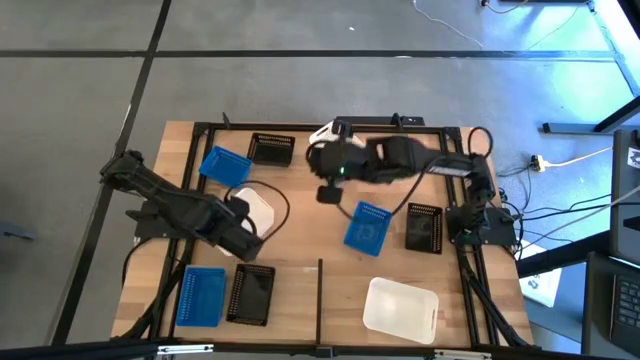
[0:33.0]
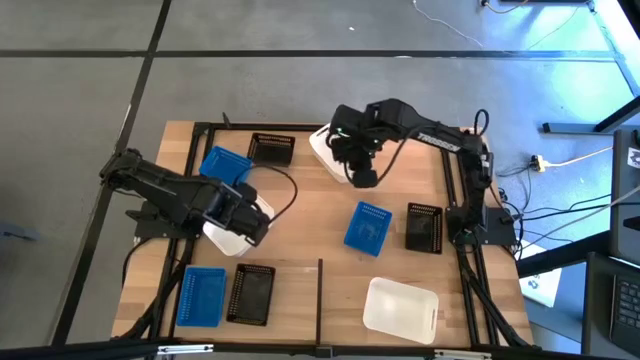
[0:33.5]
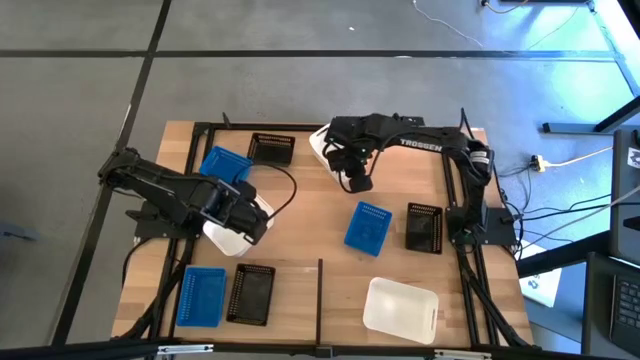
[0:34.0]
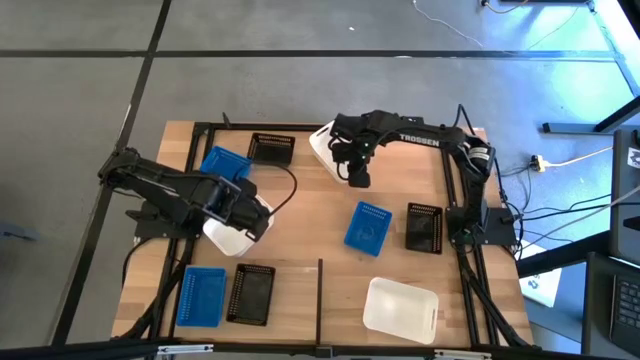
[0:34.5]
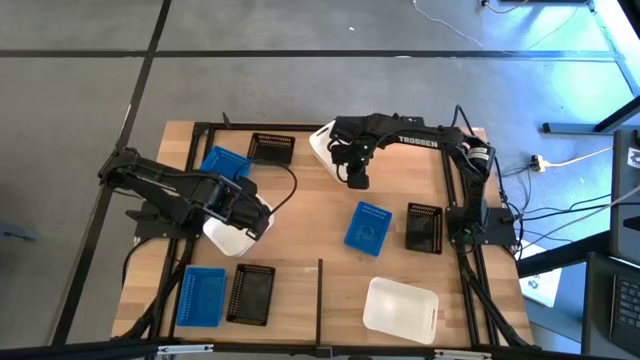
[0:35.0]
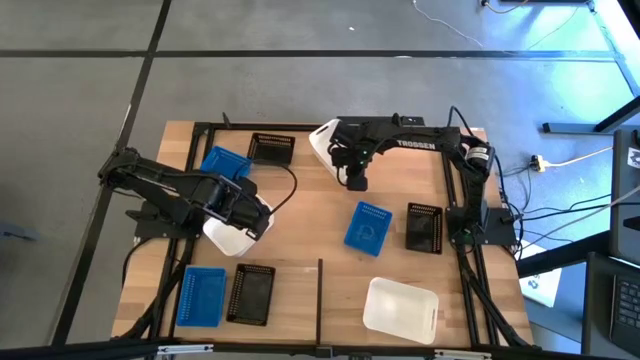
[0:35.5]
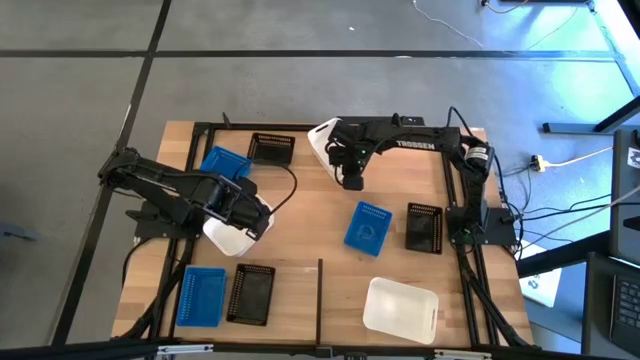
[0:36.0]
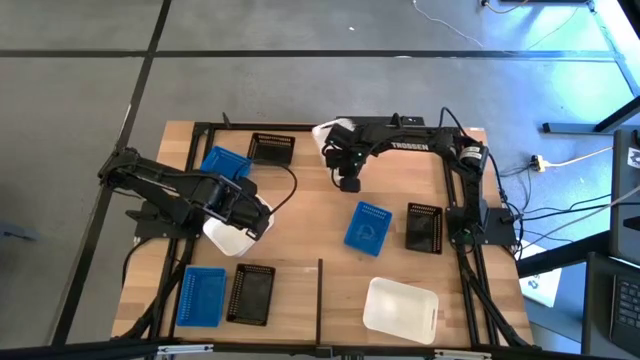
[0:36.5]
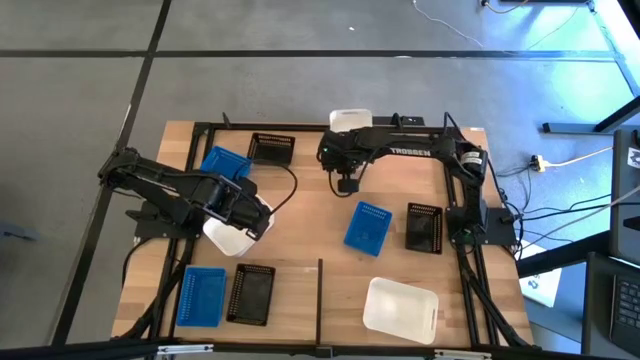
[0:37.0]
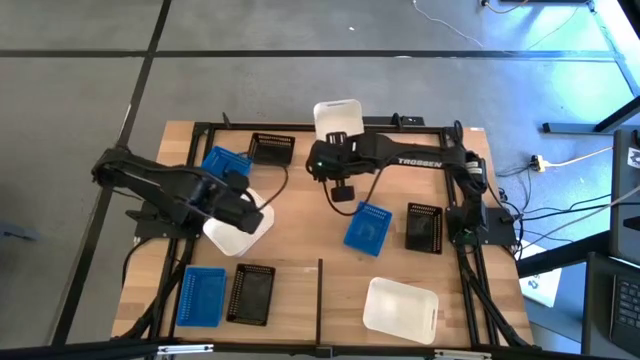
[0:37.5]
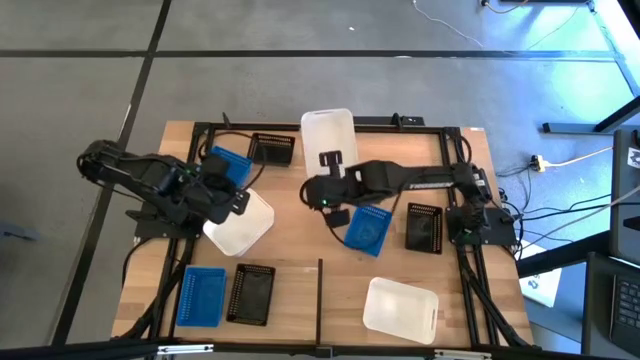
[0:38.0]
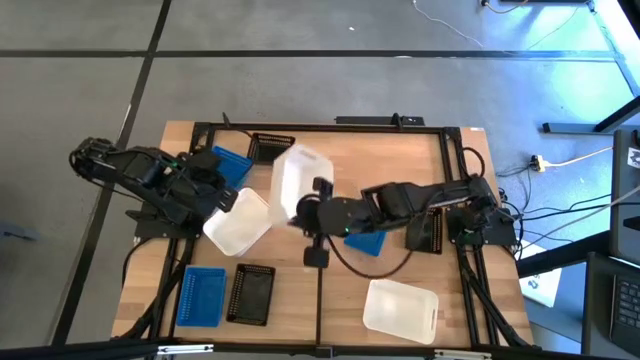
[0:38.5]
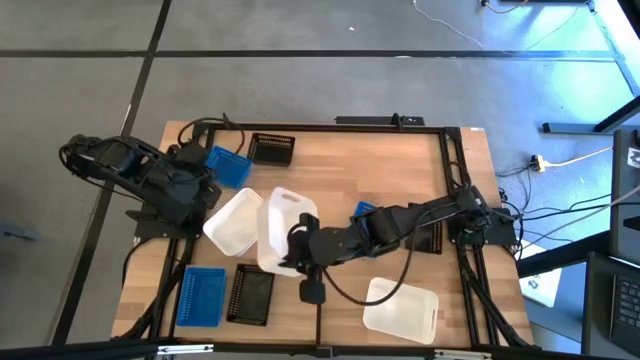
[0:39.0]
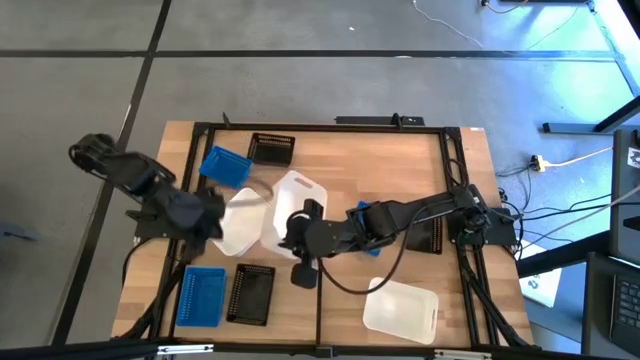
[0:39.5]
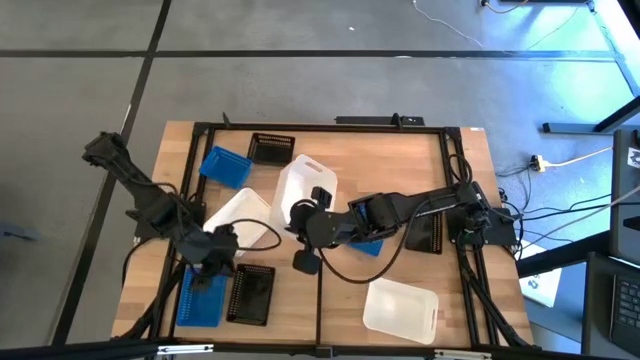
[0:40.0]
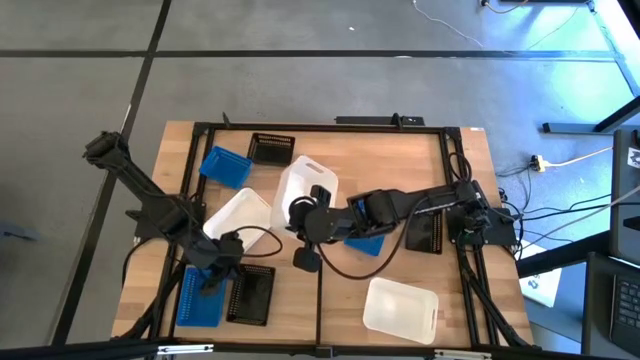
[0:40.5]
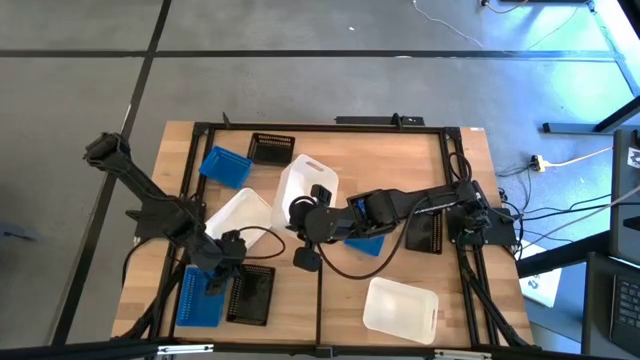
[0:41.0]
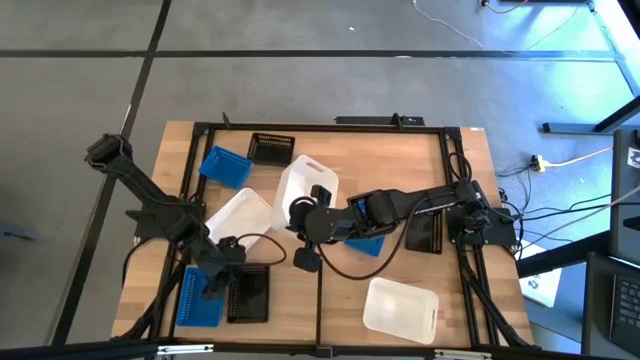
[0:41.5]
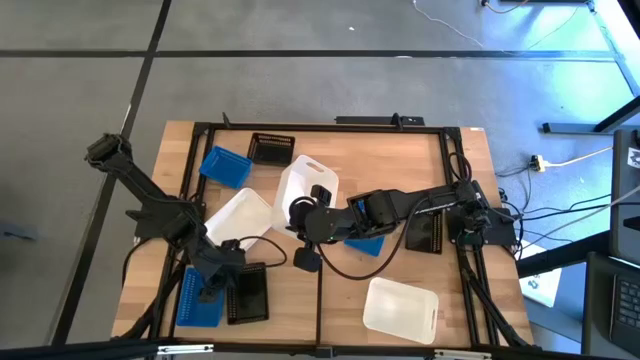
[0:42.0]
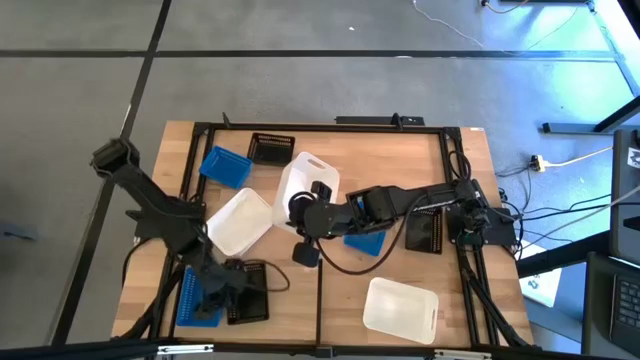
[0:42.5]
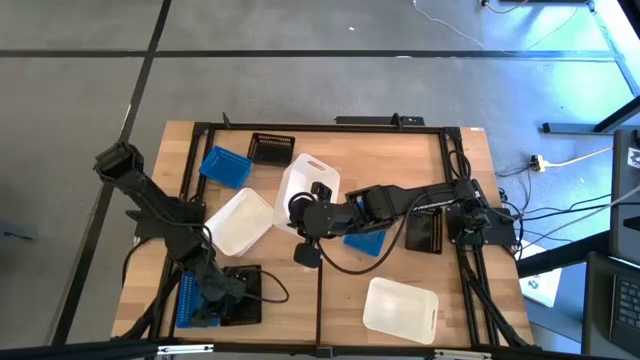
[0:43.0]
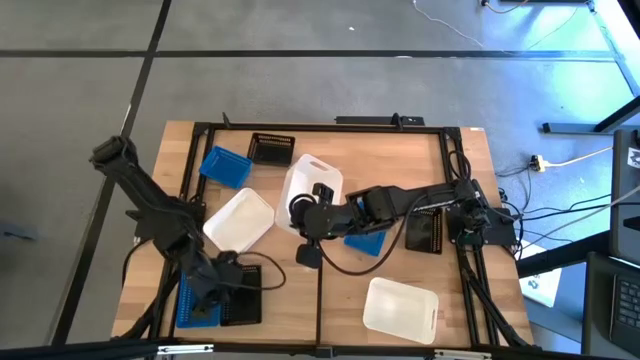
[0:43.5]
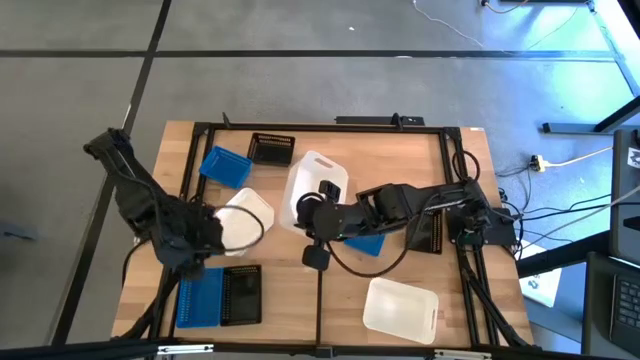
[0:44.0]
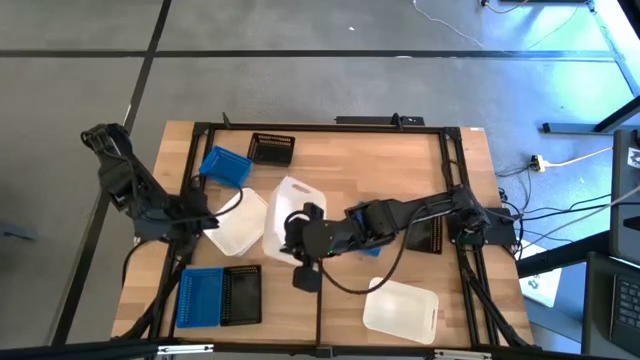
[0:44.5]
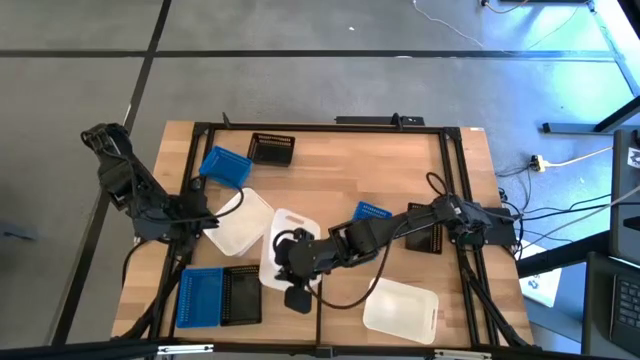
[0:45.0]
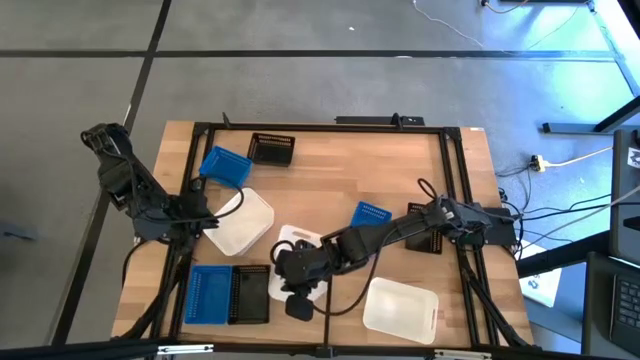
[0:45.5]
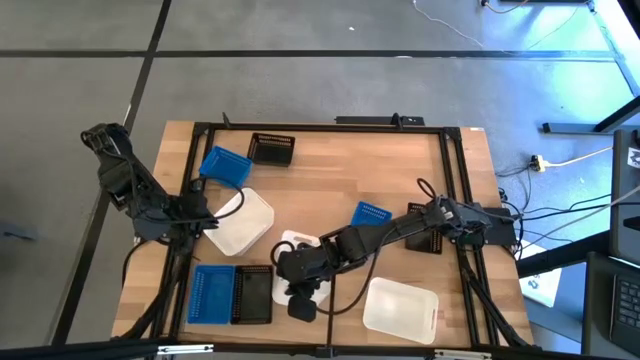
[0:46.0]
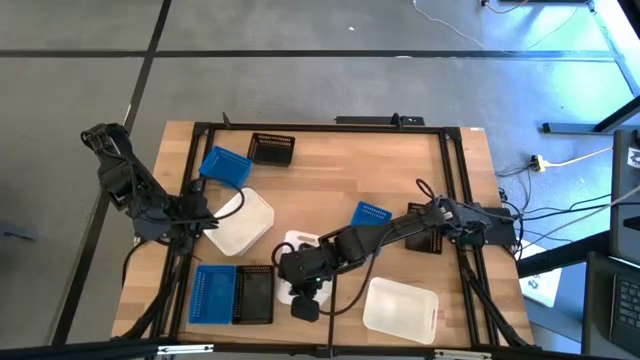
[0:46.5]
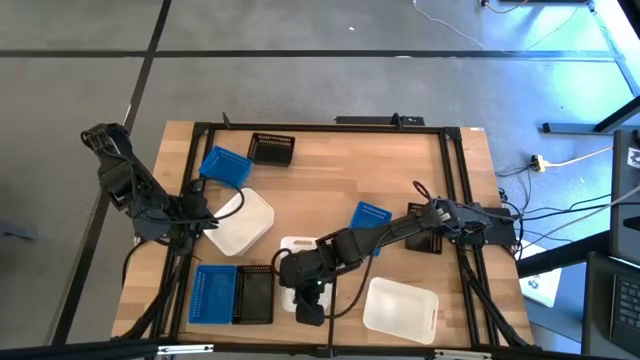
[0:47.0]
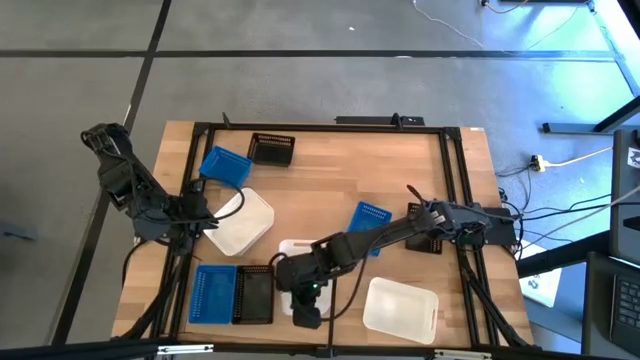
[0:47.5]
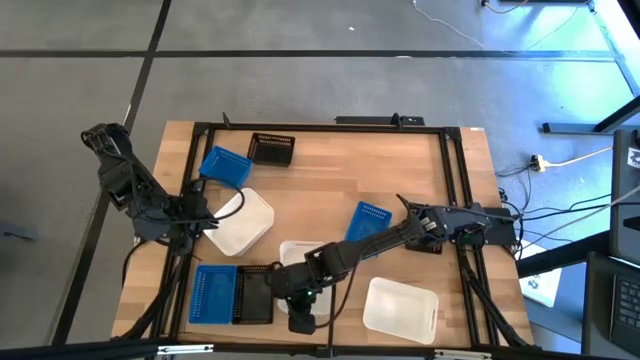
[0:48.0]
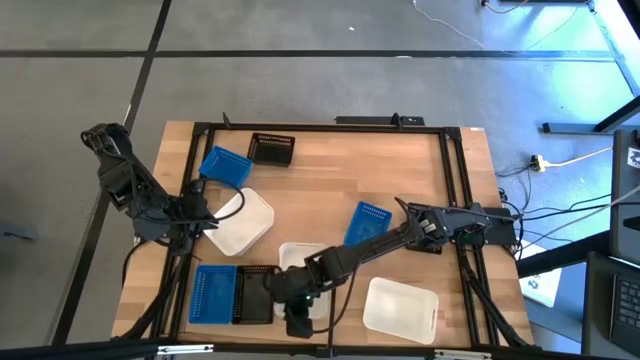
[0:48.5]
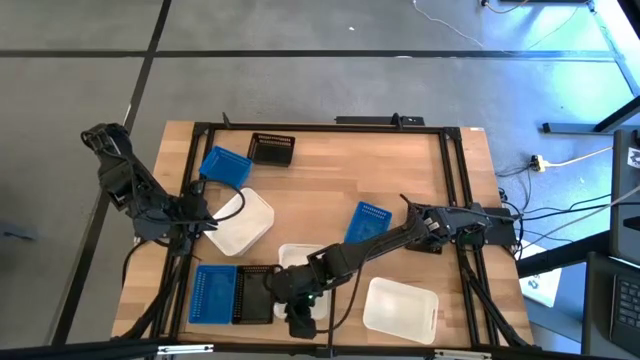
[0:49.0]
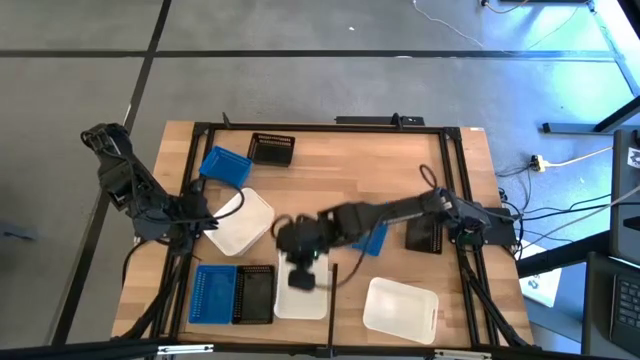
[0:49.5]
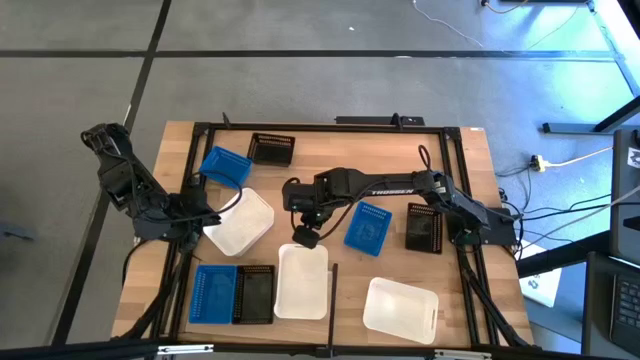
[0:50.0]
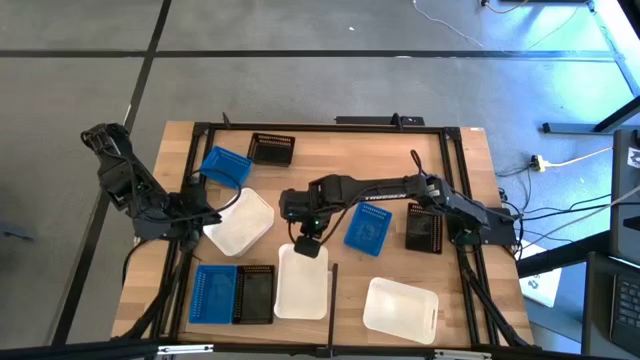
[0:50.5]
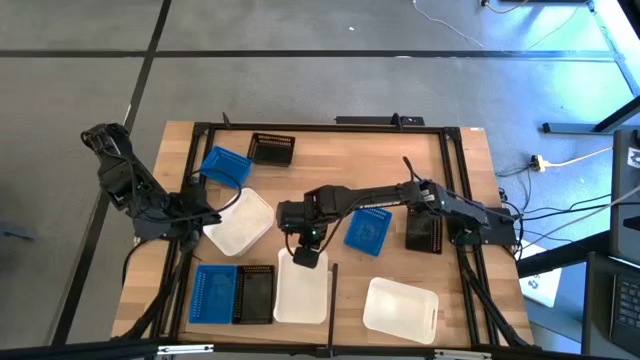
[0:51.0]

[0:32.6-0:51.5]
Task: Stack baskets on shelf by color
Put the top white bin on the shelf

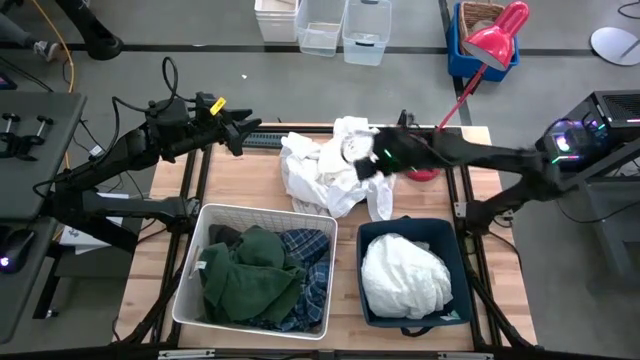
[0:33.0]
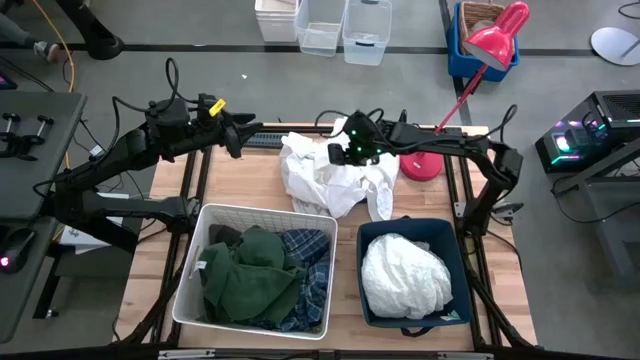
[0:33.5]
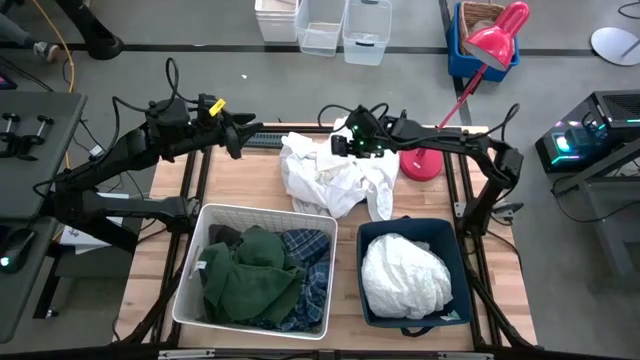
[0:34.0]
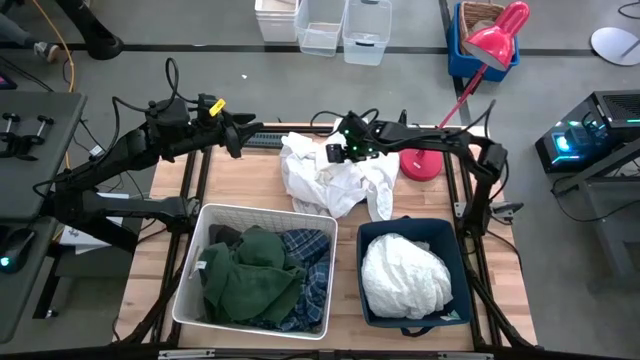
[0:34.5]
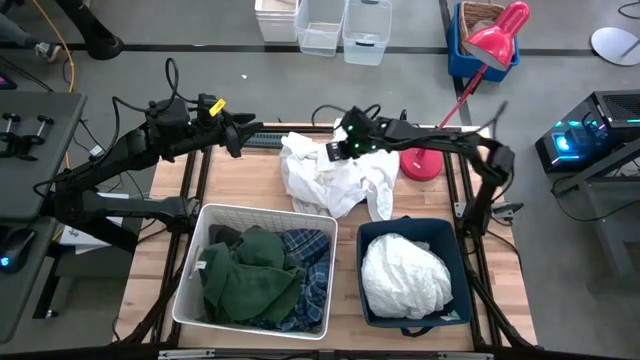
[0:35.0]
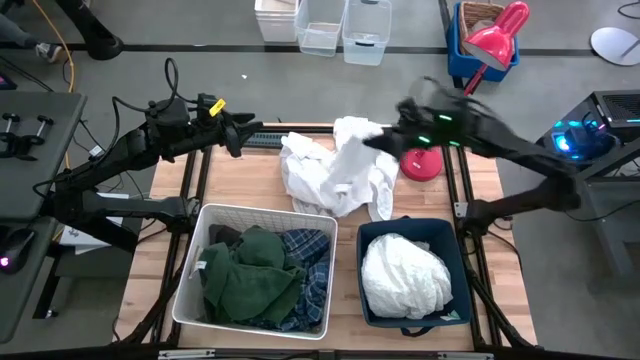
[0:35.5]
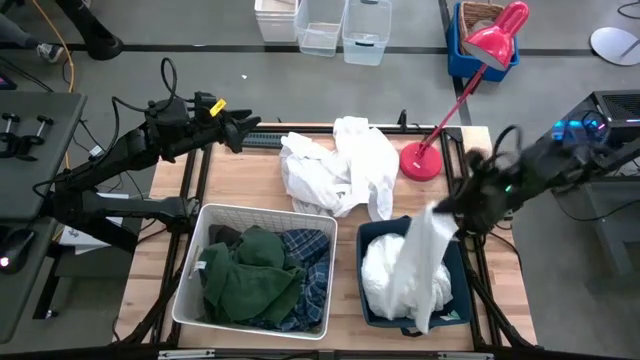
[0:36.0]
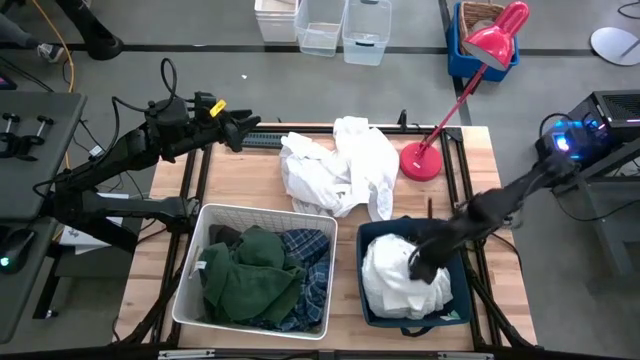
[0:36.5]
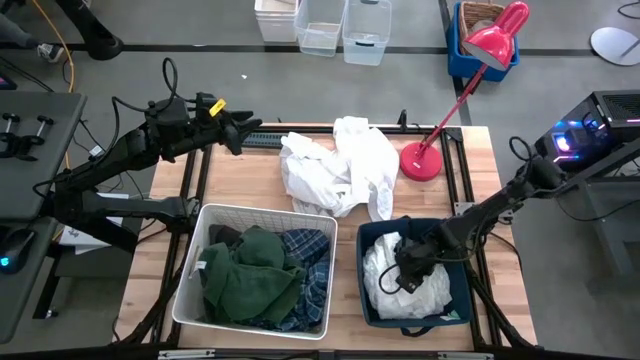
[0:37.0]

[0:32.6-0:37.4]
Task: Sort clothes
Put the white pants into the blue bin
